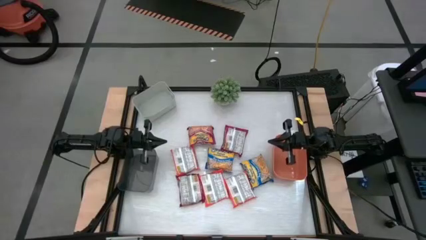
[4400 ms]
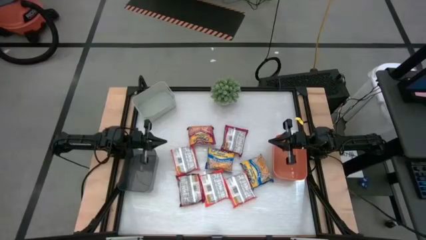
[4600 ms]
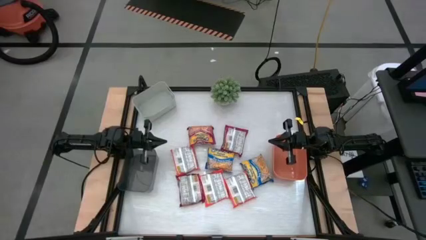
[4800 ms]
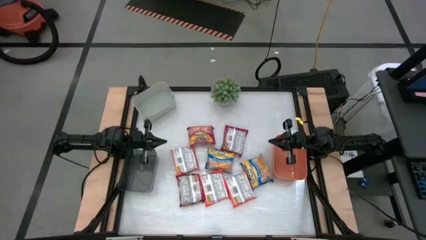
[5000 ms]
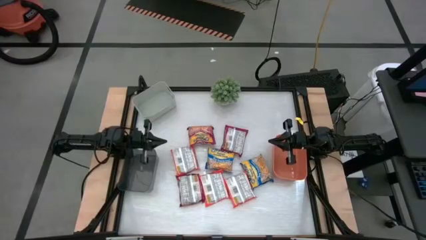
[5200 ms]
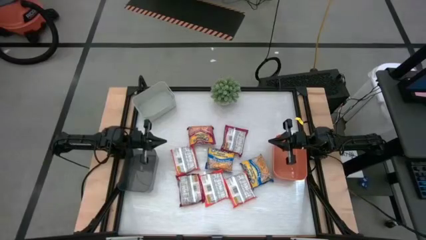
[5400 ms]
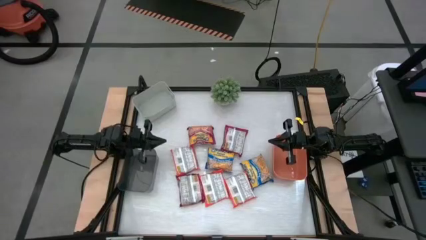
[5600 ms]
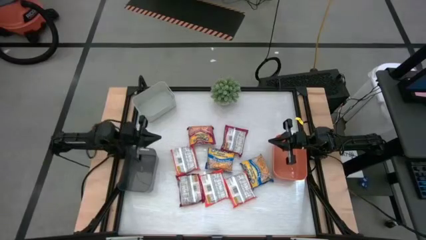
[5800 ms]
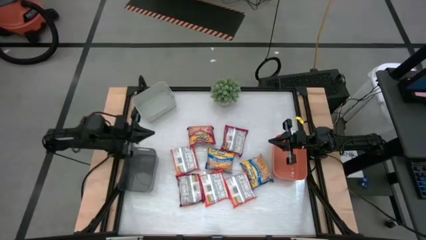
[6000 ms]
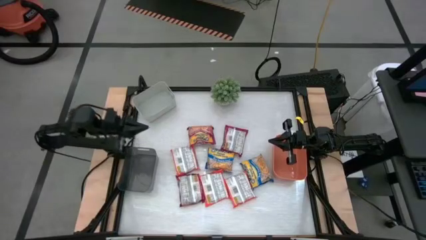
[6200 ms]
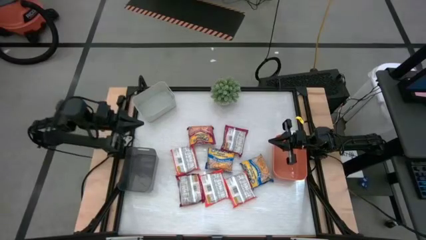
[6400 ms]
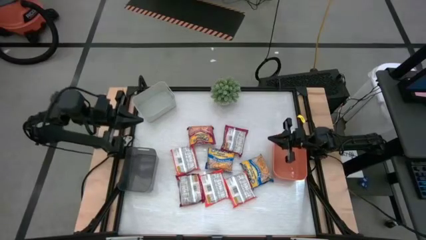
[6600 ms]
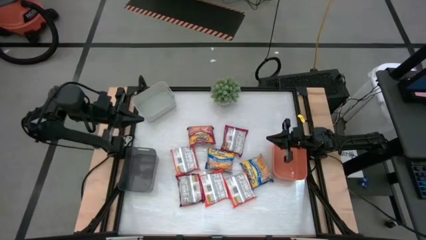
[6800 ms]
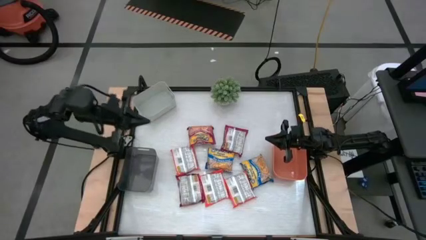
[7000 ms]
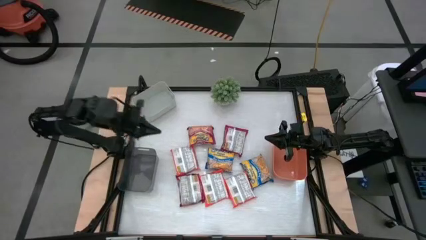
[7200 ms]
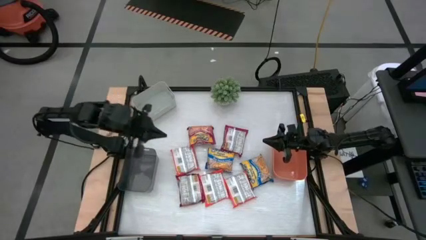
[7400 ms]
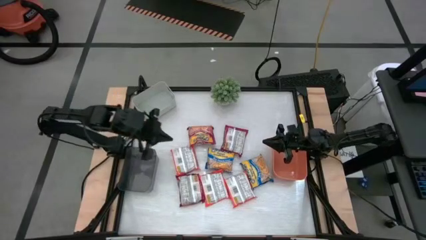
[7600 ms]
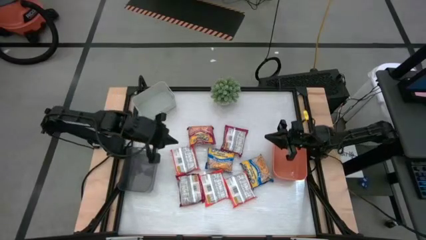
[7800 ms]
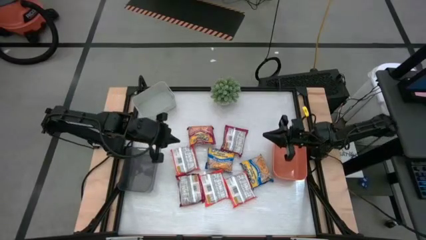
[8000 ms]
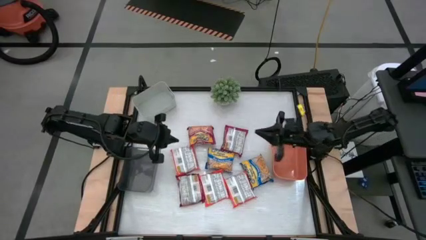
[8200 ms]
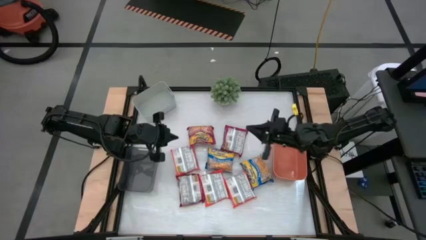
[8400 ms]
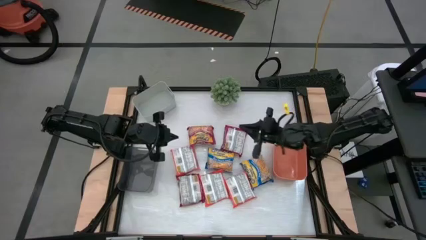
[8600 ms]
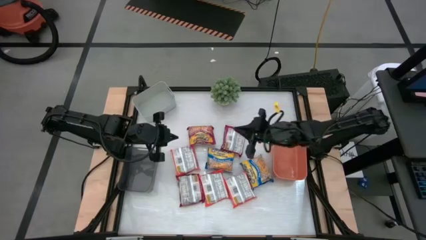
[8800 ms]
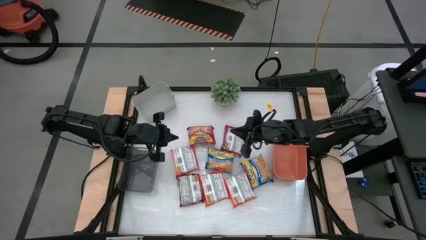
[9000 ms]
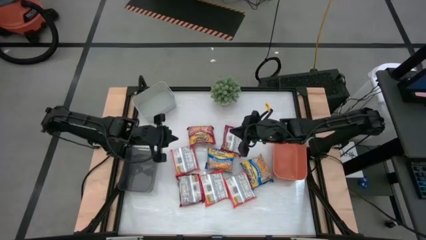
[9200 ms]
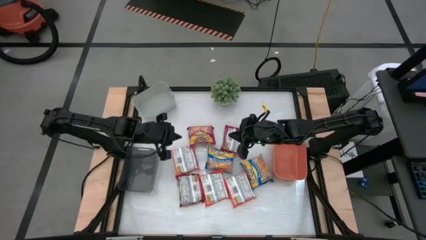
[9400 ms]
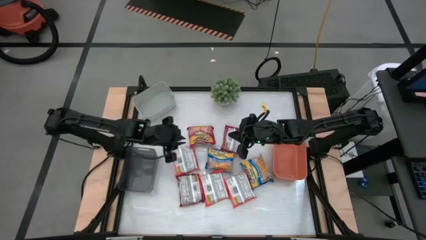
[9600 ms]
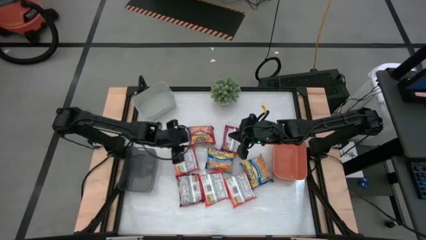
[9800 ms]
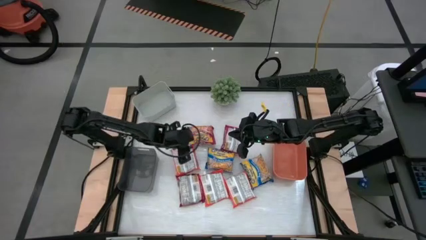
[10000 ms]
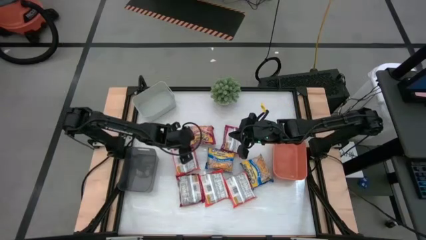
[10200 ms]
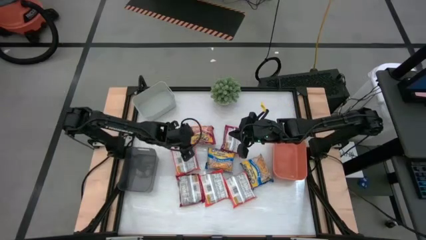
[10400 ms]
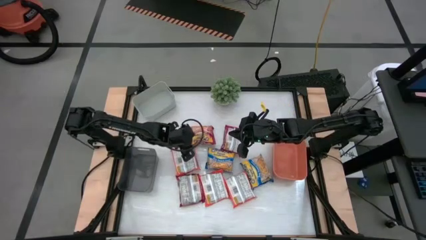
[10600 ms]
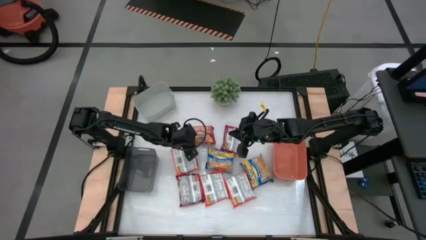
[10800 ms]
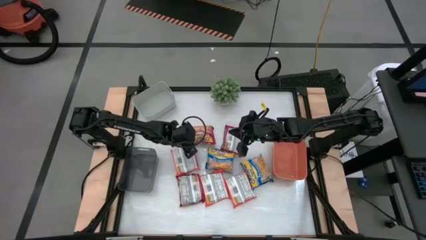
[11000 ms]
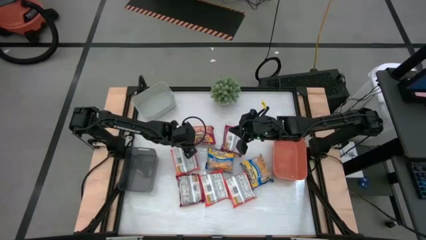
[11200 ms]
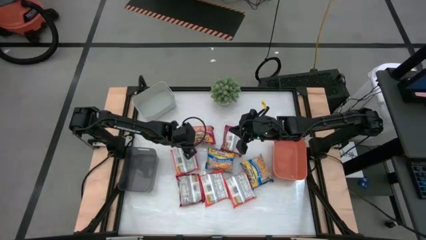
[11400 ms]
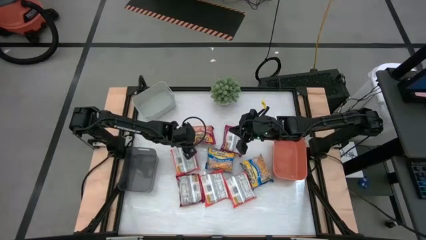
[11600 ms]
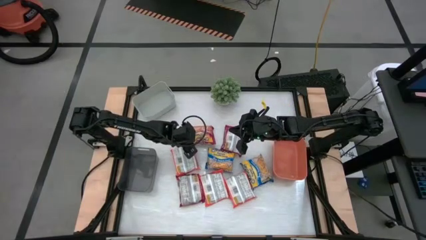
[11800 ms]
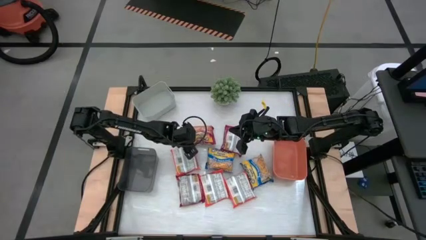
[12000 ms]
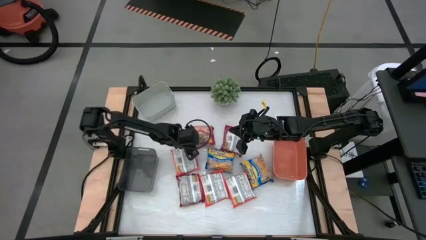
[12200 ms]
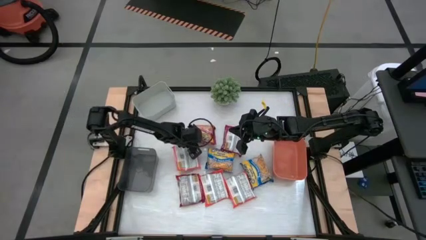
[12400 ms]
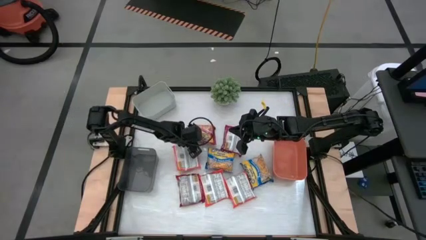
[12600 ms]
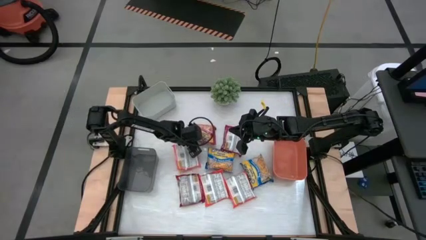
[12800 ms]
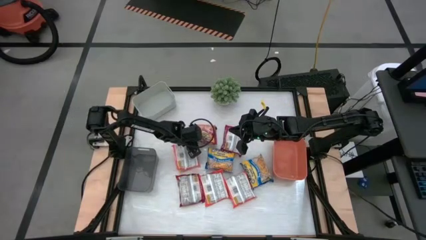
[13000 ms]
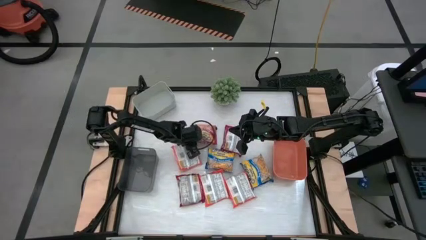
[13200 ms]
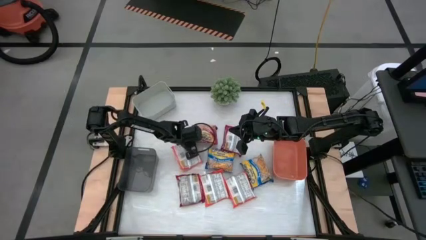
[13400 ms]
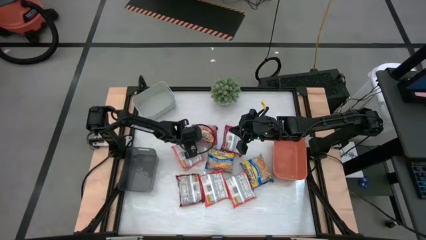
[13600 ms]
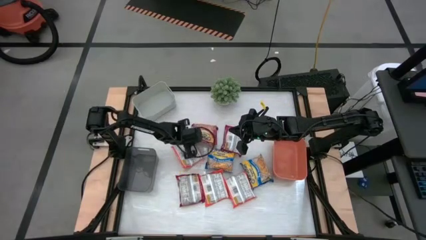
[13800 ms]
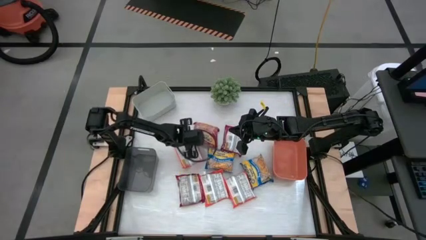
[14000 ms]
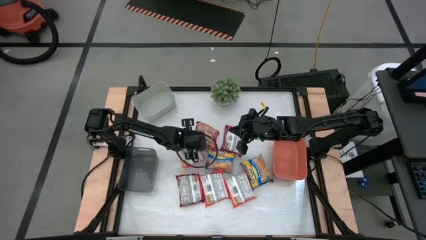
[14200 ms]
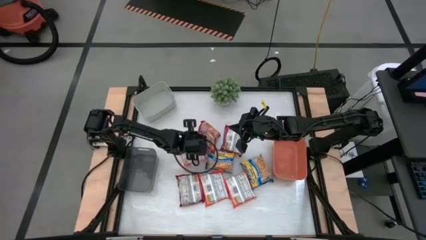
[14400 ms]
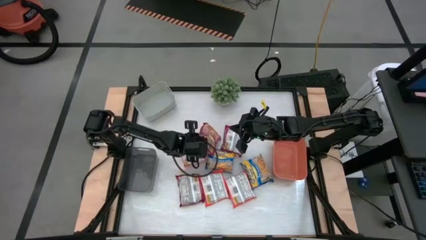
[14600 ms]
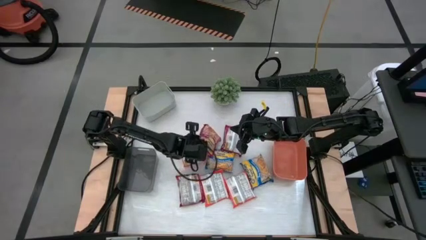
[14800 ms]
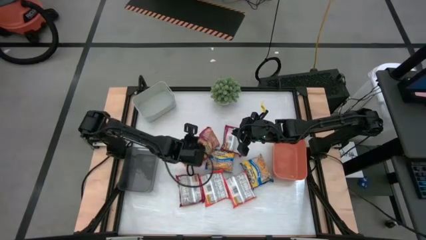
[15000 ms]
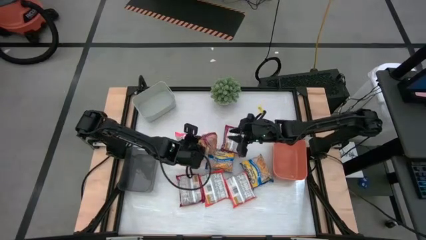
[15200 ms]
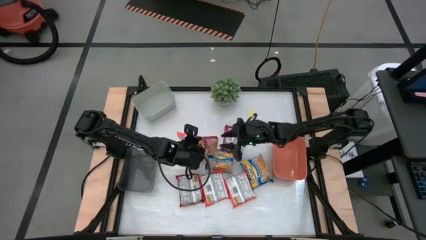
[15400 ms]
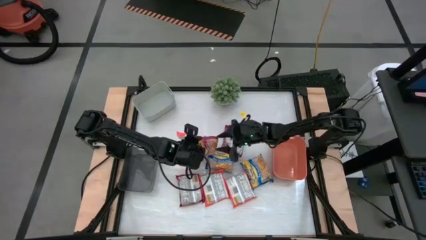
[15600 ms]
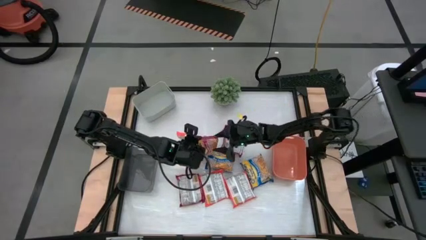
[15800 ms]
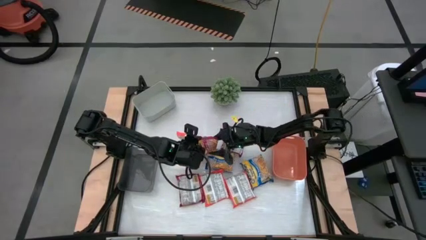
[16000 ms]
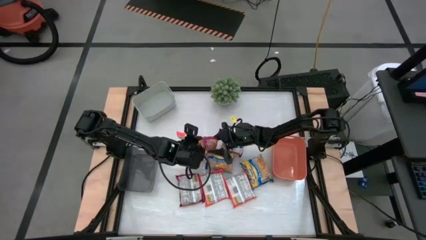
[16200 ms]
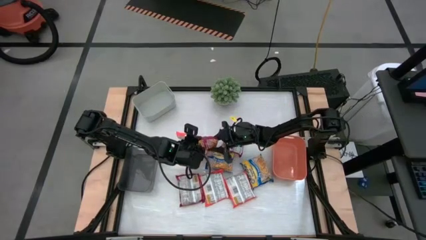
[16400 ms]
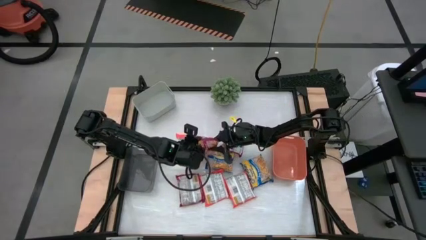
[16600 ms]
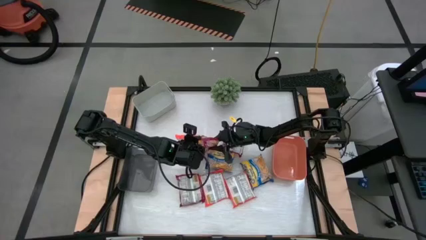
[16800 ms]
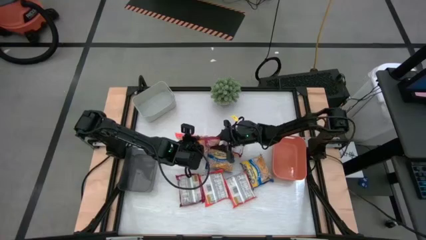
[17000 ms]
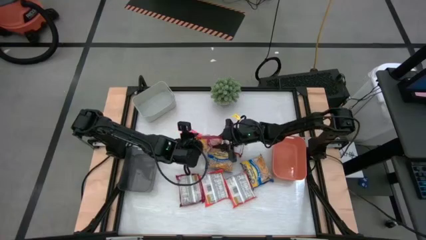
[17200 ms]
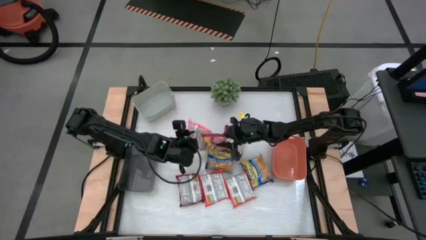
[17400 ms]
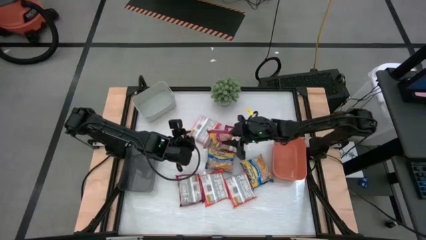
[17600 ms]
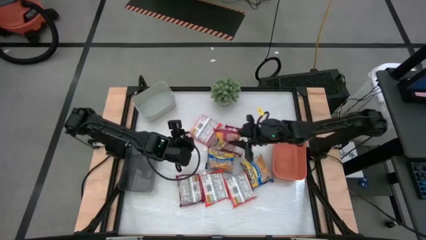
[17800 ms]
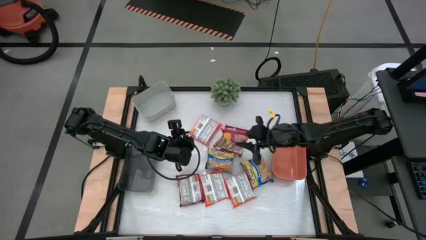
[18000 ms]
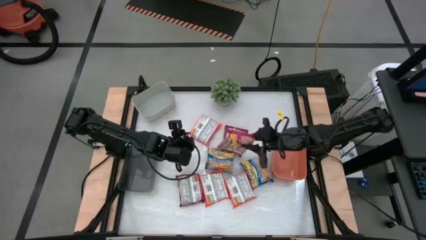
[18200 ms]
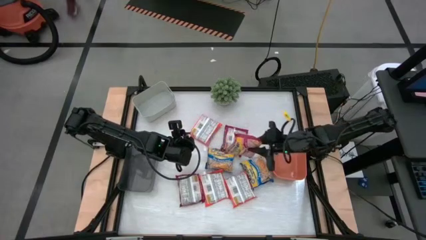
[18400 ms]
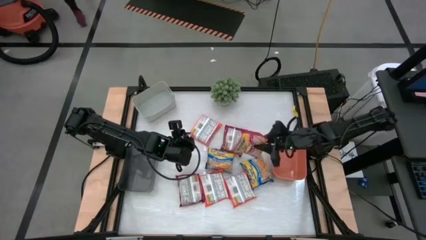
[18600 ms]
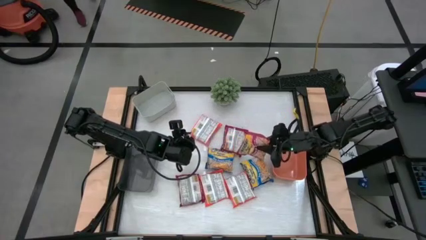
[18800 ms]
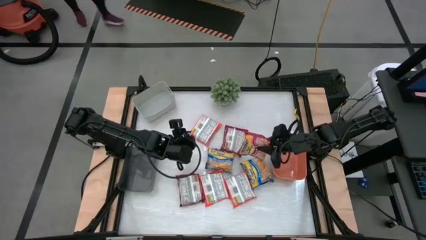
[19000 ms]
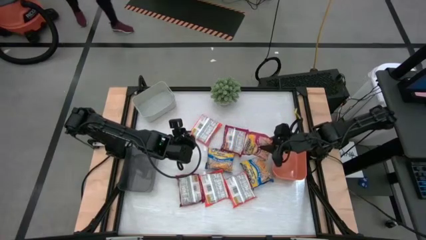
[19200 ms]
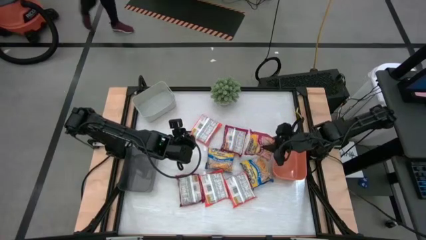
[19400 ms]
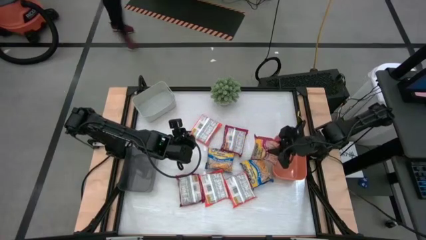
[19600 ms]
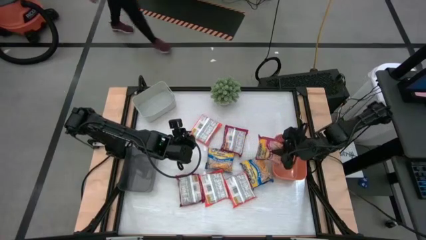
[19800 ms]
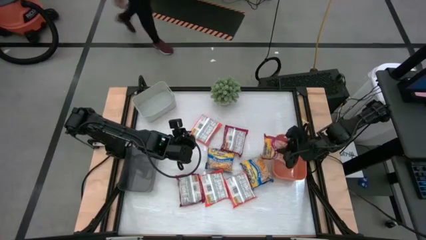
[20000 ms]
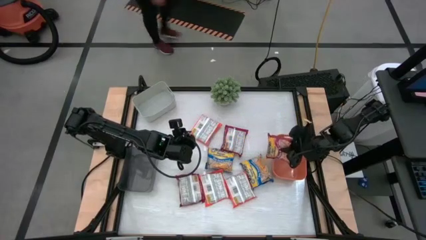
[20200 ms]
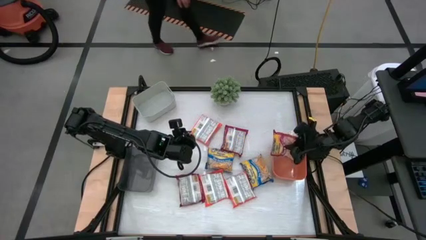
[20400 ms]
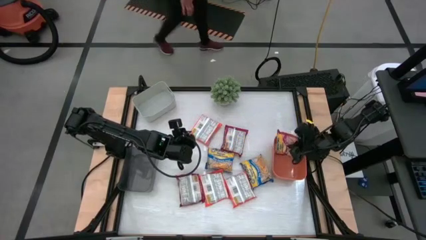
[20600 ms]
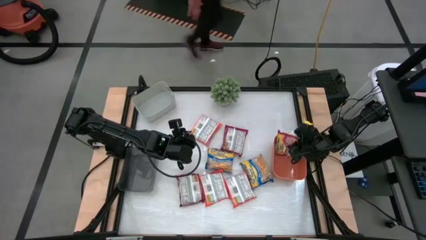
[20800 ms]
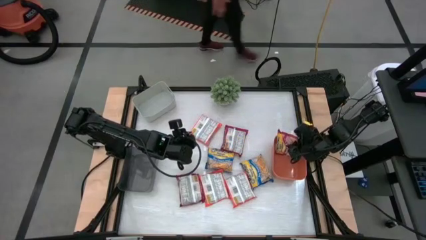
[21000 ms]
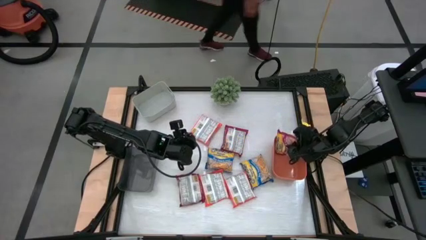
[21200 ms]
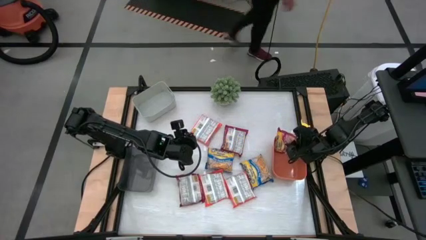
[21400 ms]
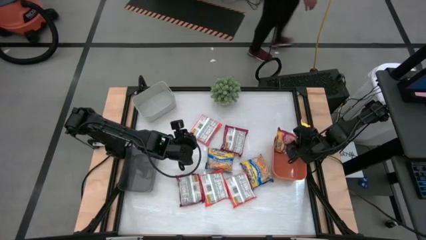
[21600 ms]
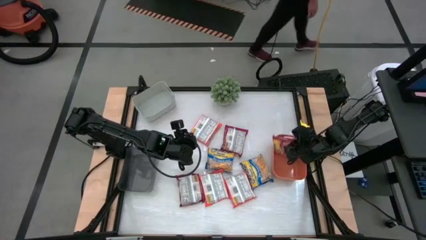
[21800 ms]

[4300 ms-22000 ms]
Task: Sort Maruchan noodles
Put the red bag into the orange bin
